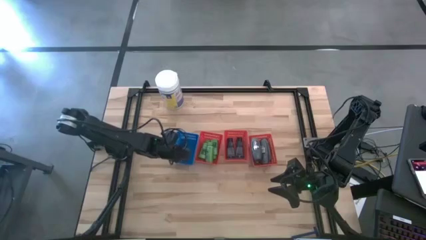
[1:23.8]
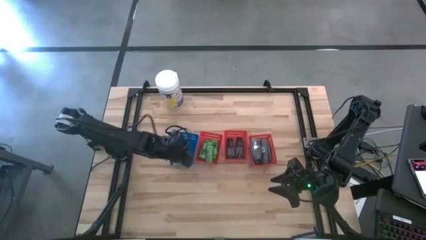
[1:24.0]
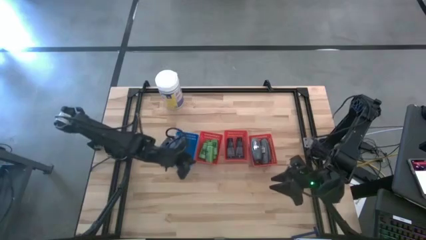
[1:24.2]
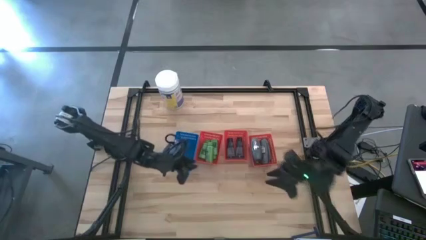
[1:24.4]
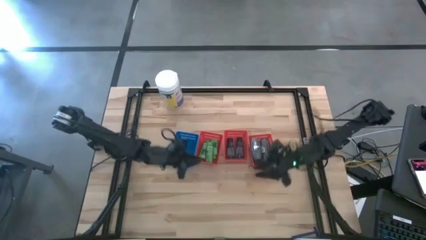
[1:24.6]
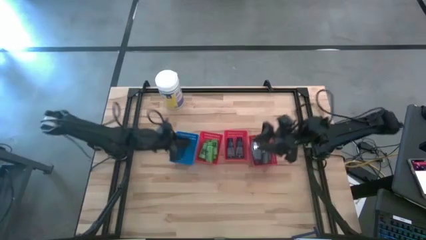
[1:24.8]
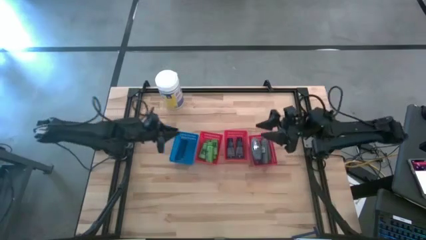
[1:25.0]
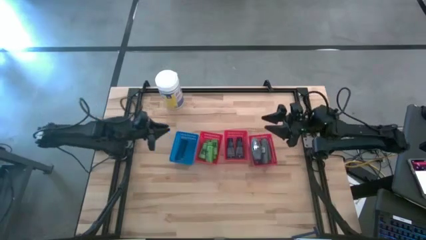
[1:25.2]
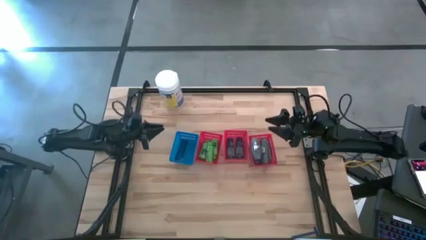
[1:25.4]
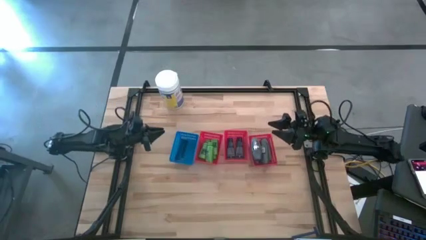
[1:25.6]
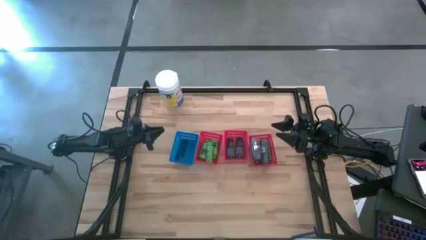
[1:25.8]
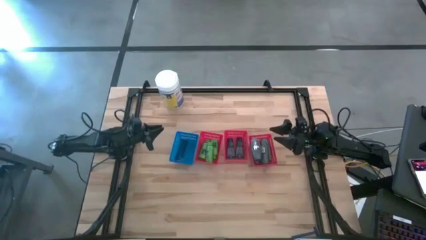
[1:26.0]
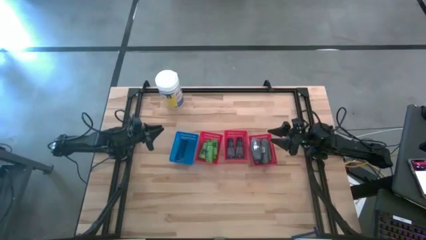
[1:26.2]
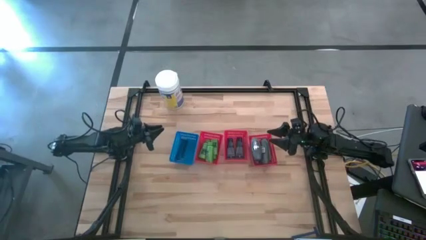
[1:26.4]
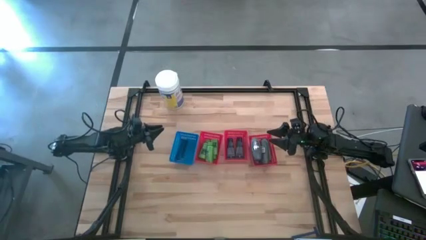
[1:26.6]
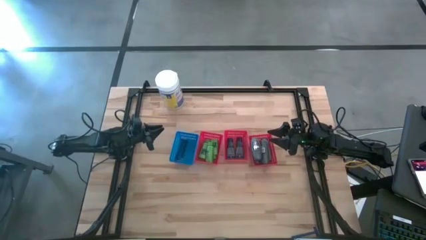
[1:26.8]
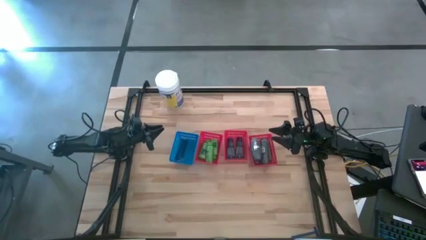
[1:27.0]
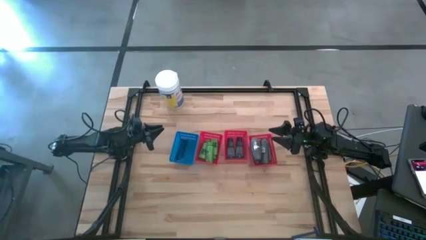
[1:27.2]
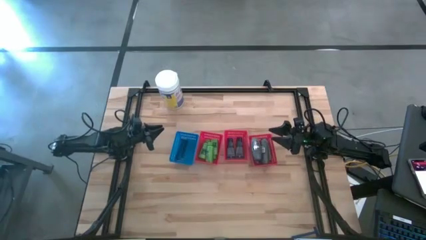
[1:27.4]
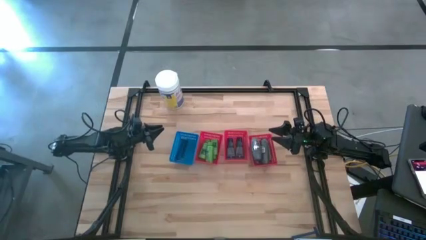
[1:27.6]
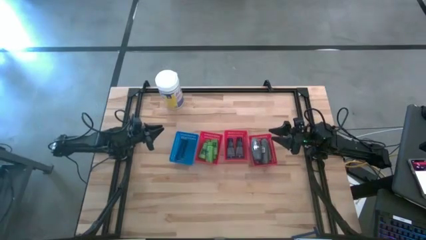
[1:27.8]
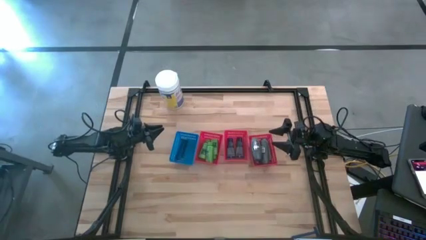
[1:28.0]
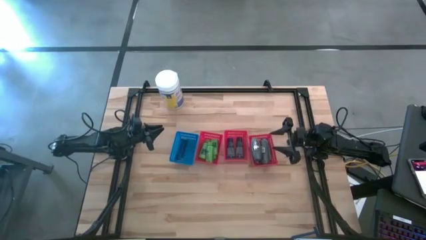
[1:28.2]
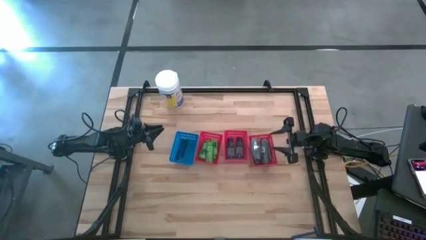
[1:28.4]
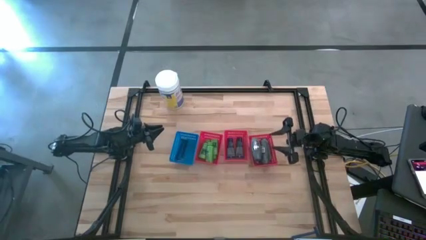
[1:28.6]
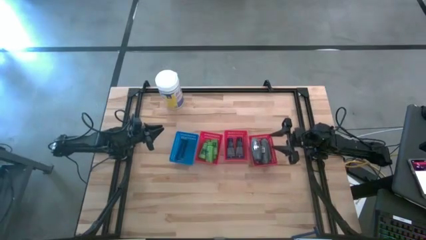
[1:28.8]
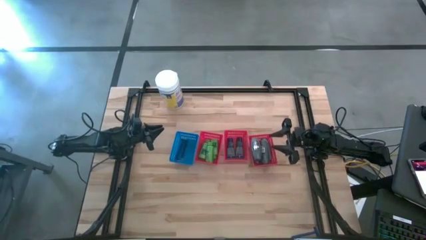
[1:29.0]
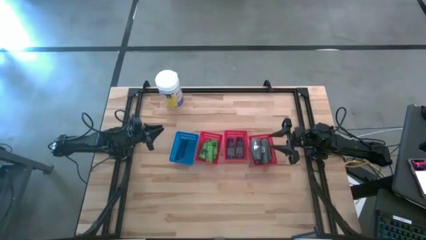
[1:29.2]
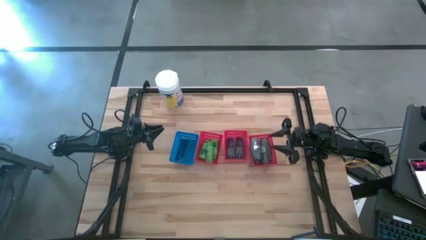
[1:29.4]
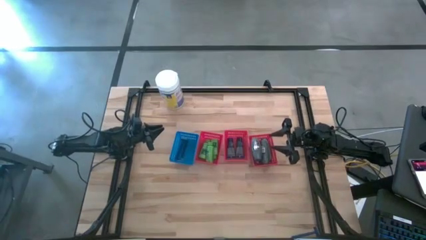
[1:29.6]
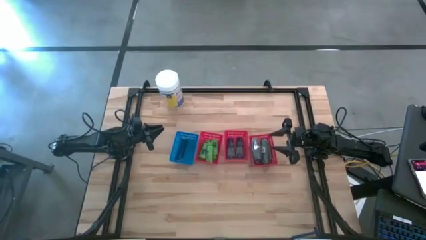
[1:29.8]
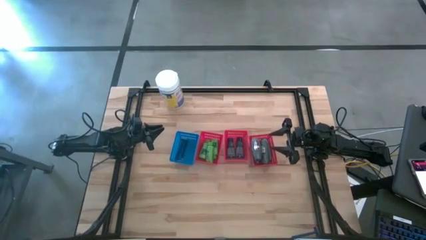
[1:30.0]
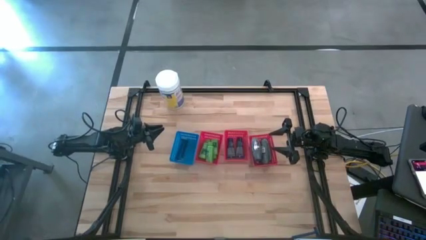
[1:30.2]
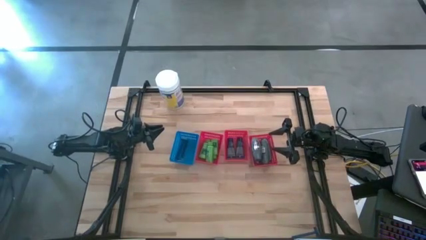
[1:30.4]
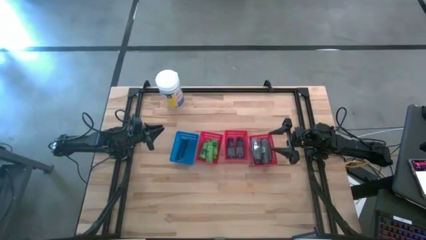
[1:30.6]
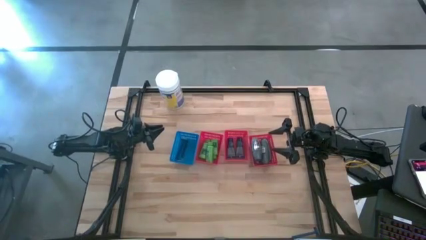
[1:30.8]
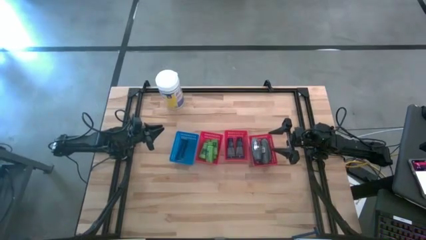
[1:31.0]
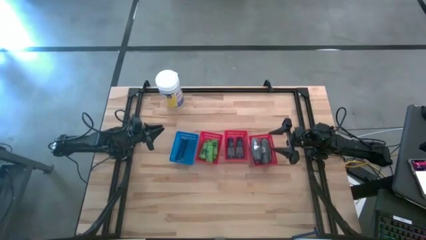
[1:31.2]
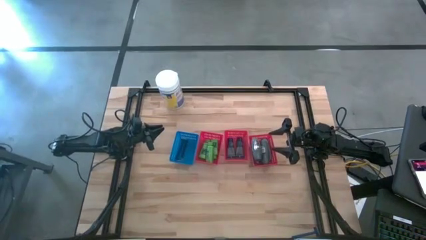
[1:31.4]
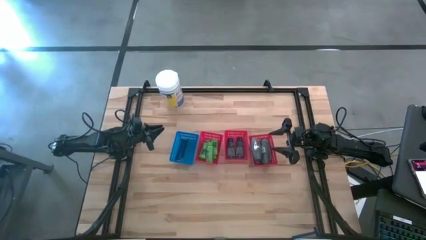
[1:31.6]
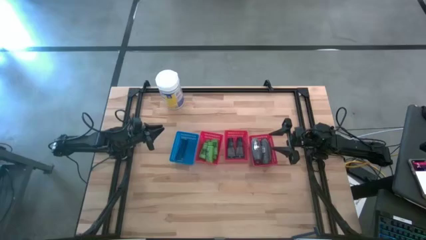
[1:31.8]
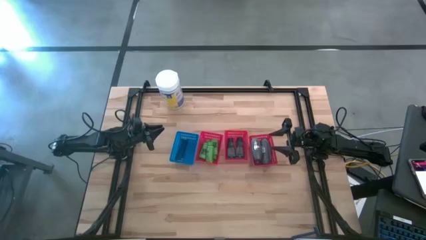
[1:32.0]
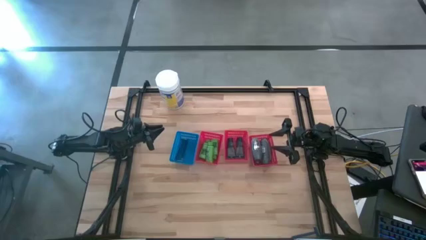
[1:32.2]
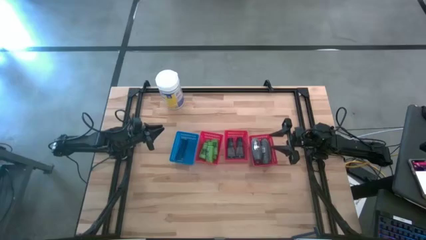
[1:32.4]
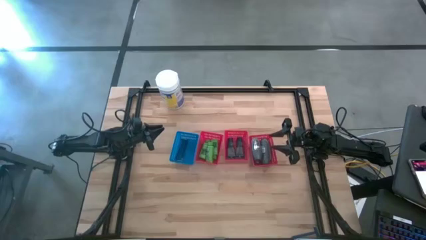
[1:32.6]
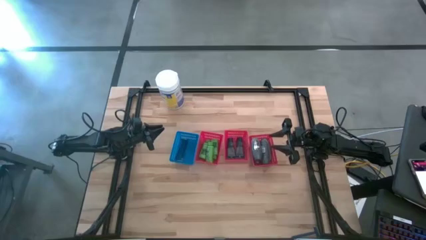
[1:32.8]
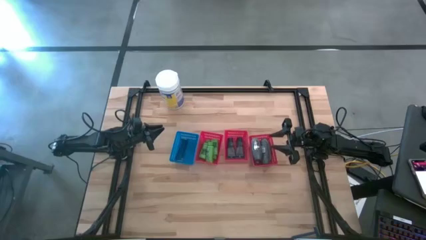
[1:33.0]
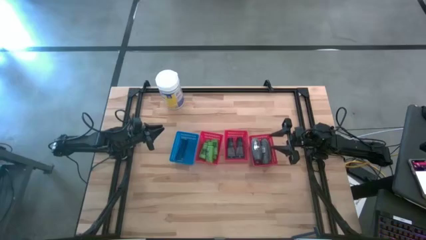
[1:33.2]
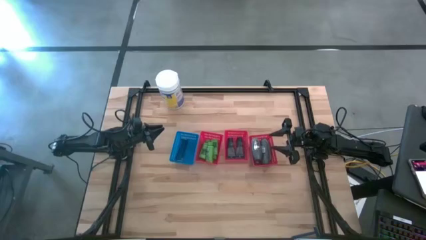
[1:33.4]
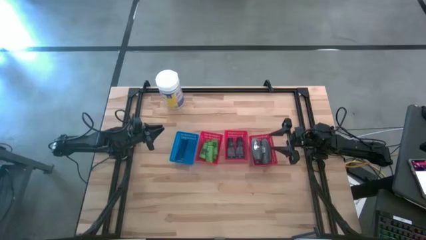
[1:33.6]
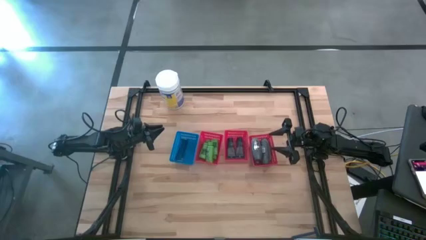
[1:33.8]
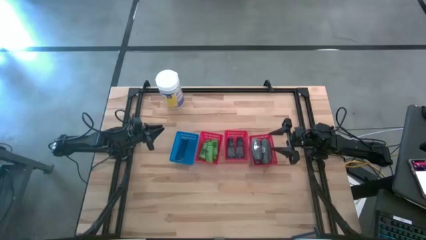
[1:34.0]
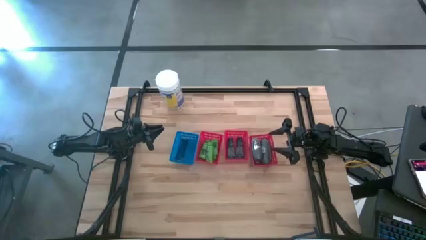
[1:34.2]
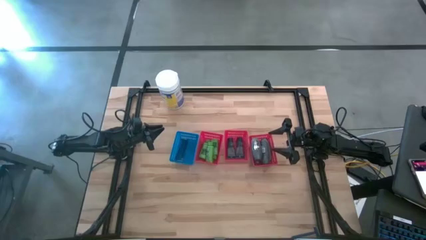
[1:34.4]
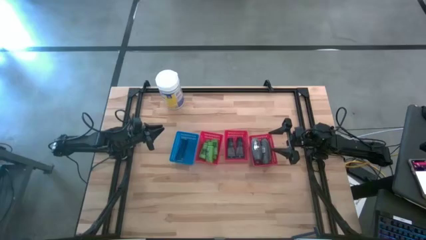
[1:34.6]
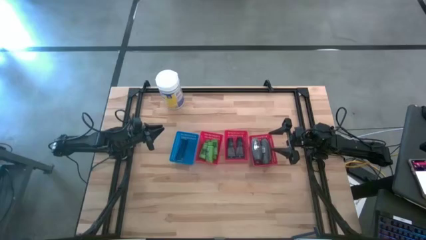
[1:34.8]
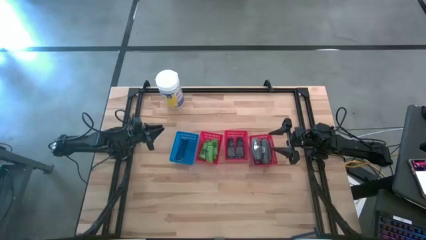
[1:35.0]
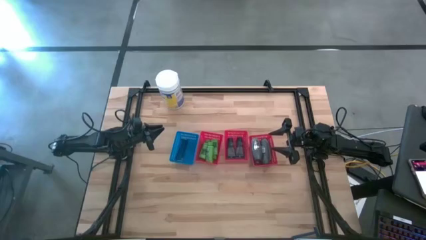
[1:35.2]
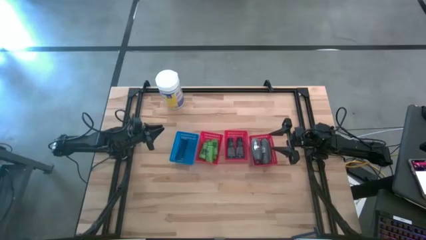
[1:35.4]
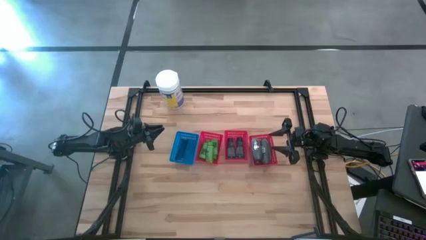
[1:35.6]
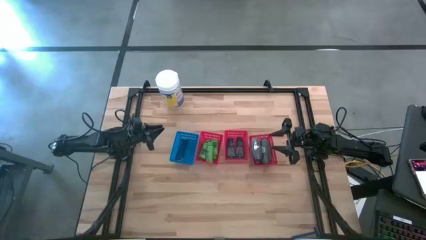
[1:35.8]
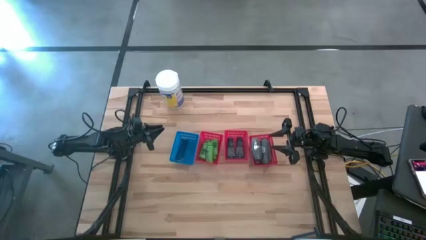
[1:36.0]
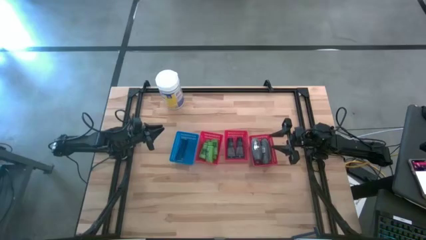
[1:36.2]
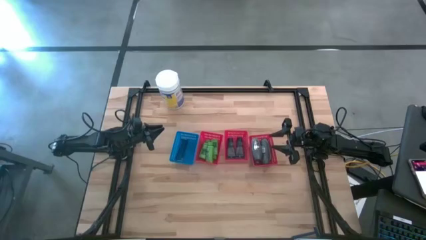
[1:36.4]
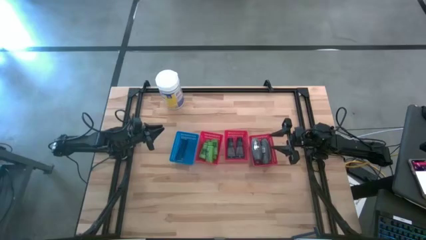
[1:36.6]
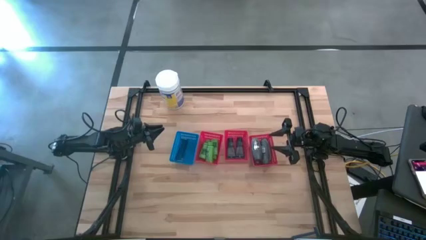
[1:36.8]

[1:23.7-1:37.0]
Task: Pick & Place Travel size toiletries
Return to Home Position

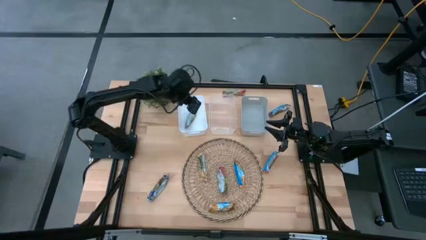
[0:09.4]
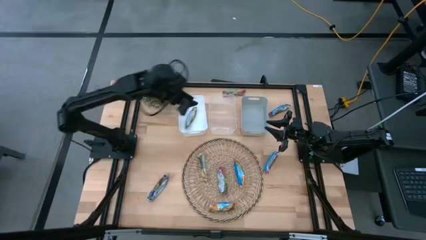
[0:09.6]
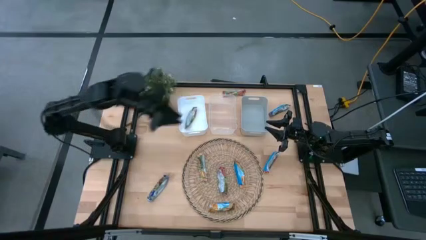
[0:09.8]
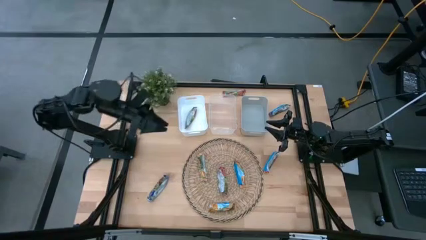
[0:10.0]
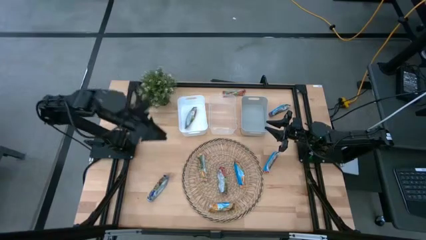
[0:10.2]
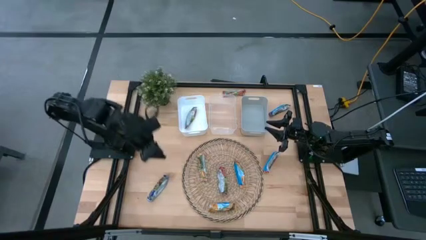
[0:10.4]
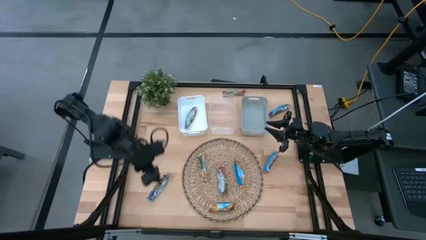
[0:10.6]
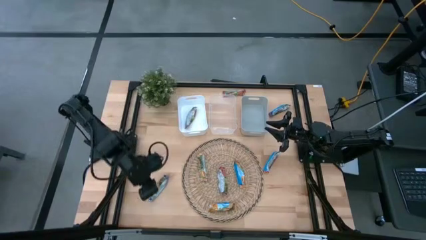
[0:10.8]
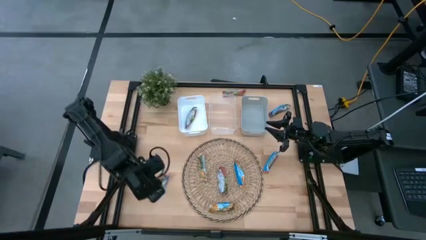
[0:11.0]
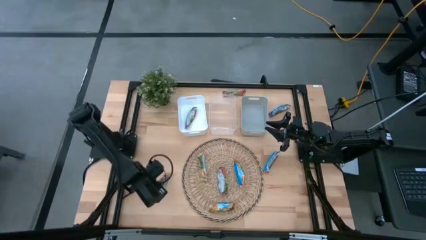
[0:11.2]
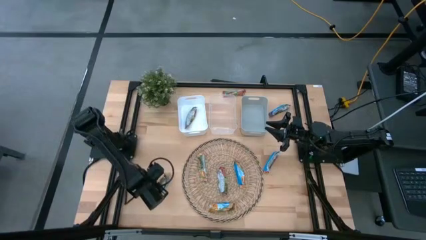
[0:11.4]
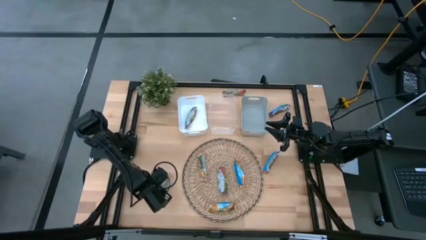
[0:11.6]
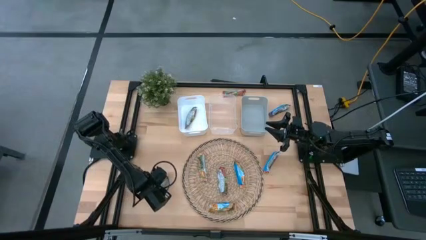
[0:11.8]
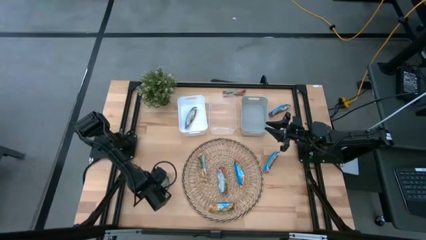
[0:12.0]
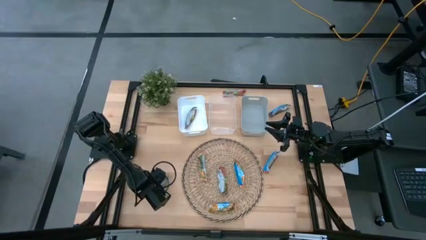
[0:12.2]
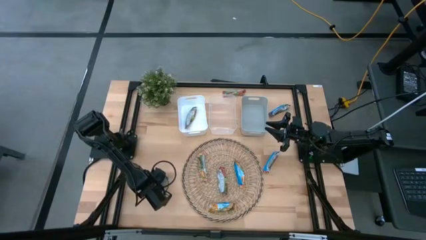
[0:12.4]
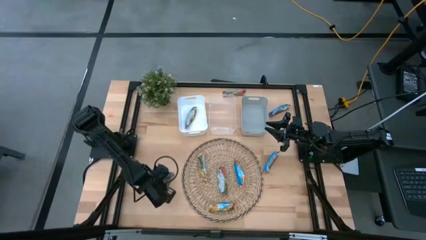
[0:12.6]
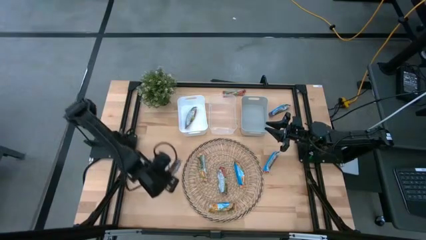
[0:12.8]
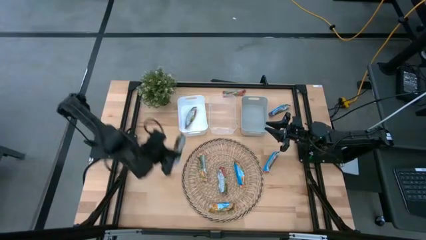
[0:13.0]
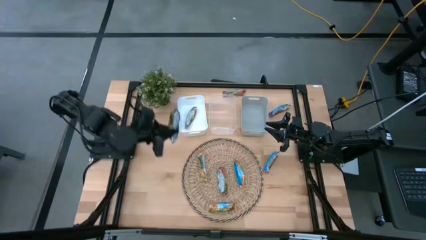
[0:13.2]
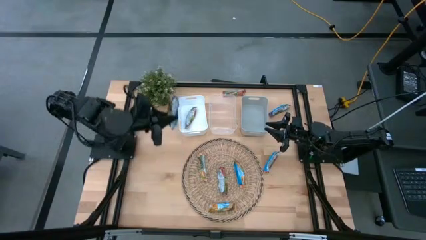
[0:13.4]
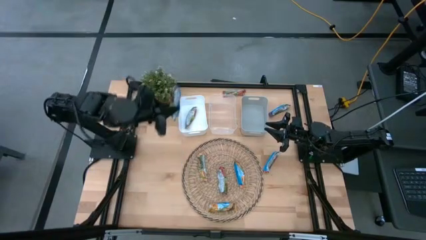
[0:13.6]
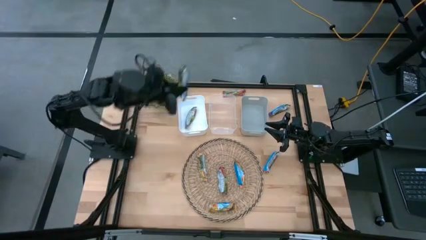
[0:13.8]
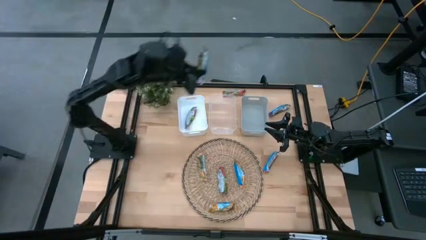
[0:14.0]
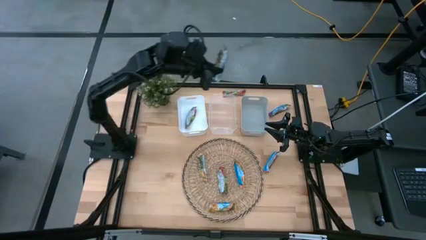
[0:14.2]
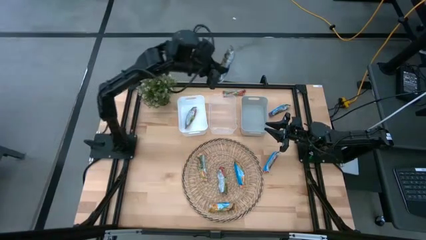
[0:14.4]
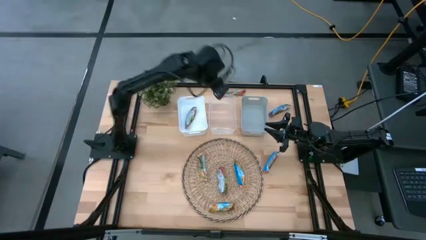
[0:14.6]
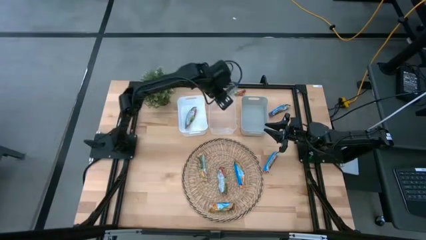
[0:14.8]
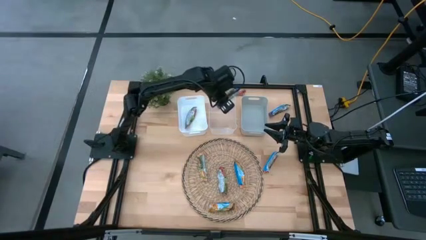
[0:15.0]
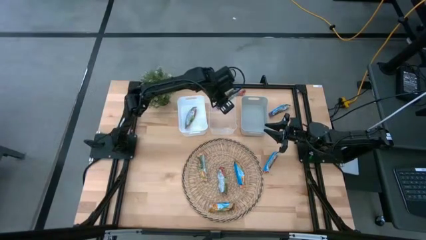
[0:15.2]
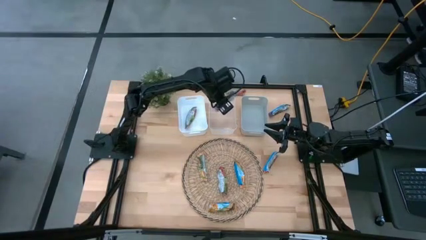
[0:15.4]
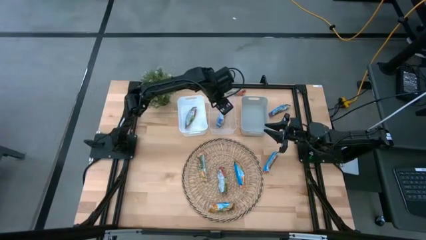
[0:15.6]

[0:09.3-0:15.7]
Task: Pick and place Granola Bars by type
Put the bottom left blue granola bar into the transparent bin
